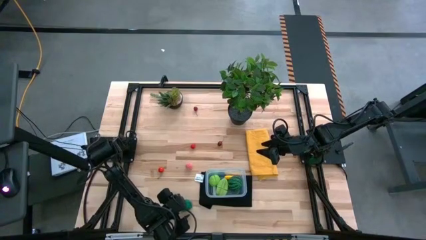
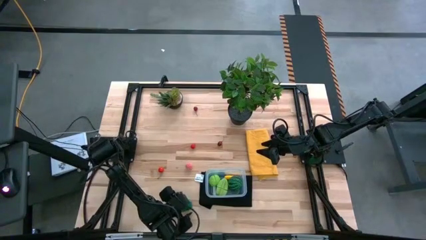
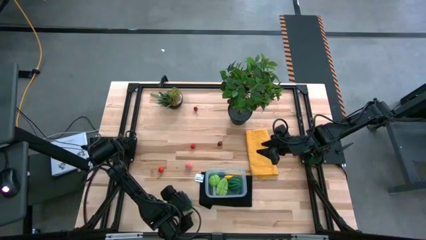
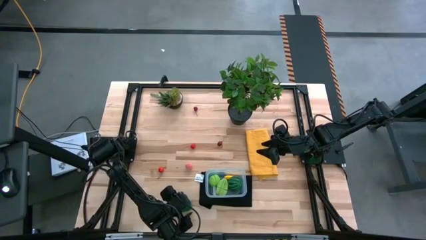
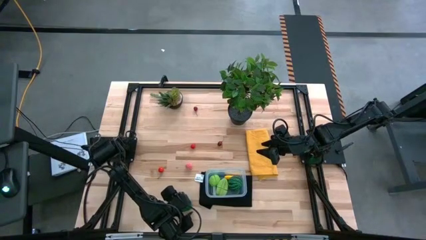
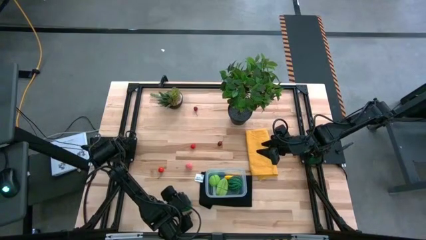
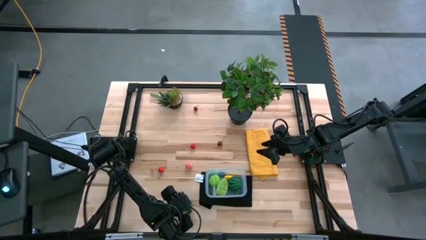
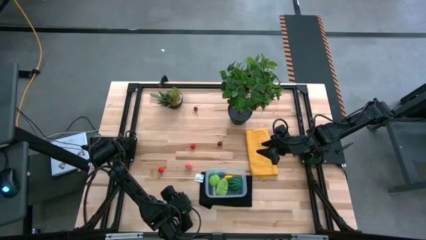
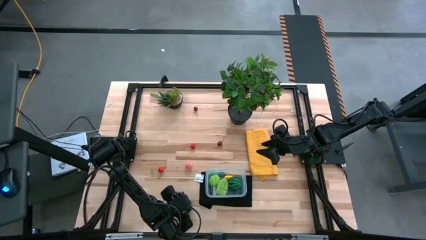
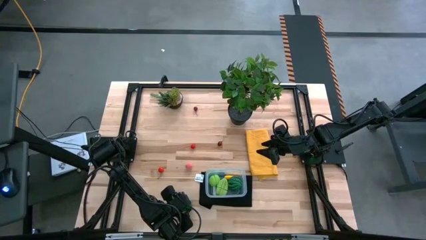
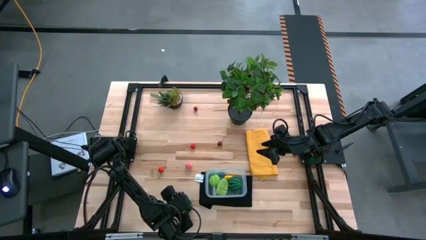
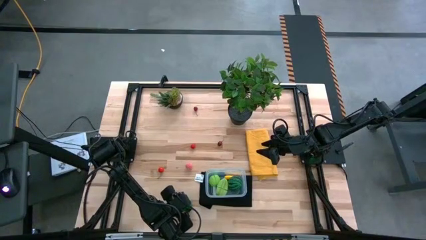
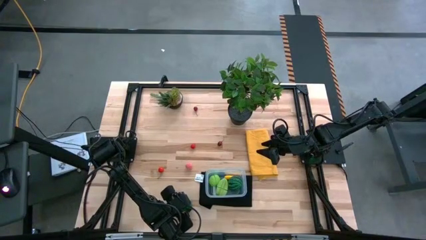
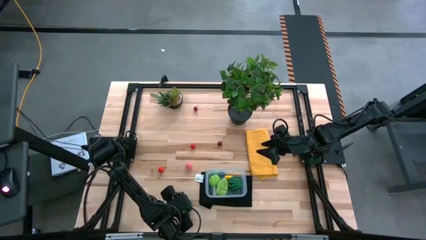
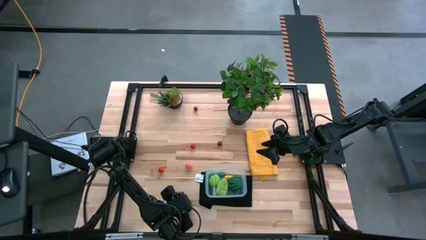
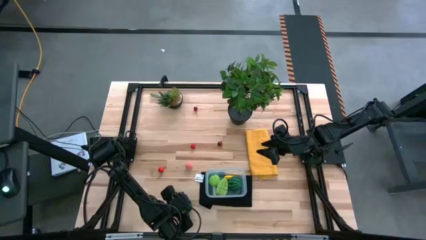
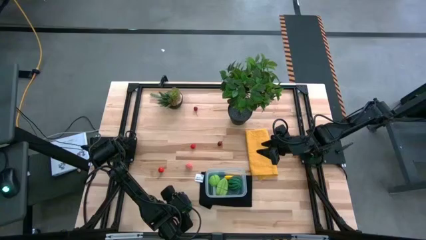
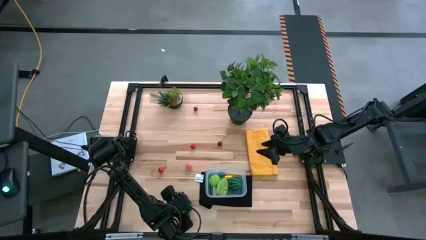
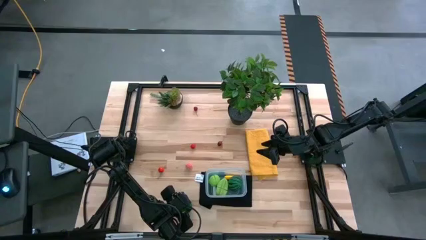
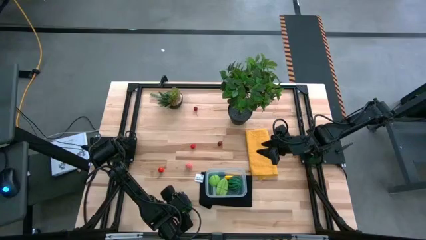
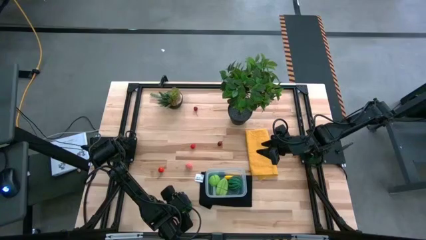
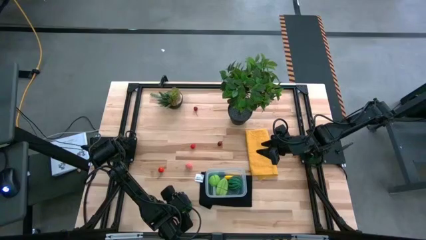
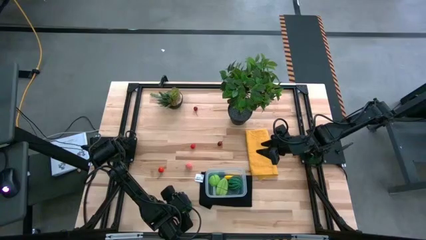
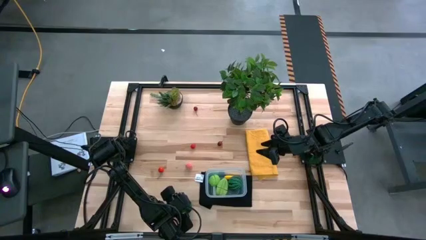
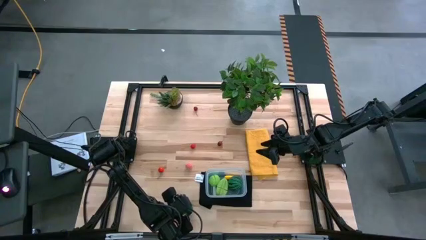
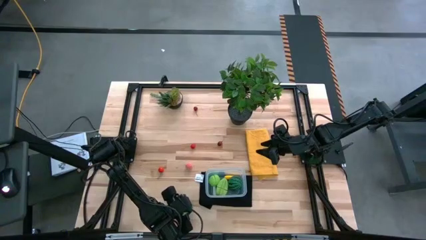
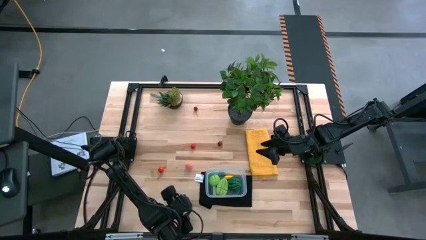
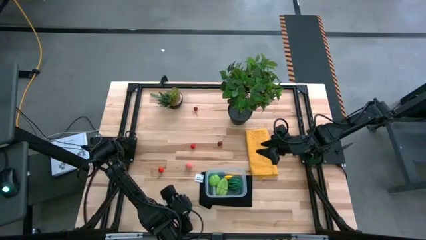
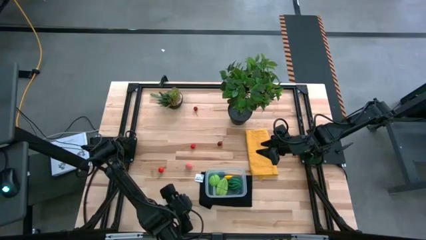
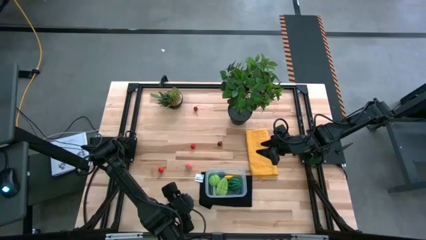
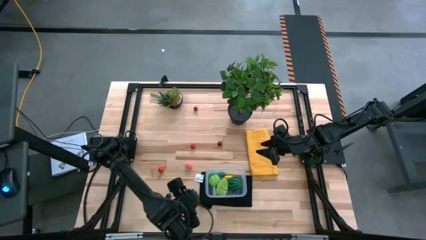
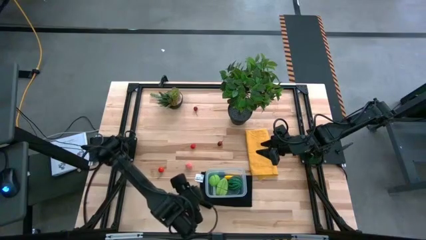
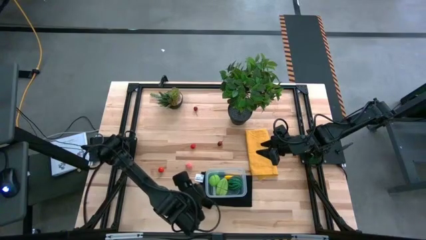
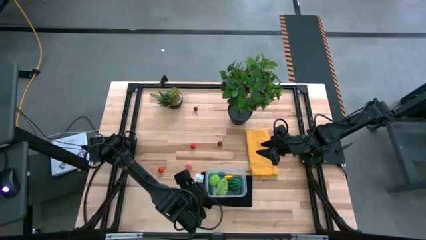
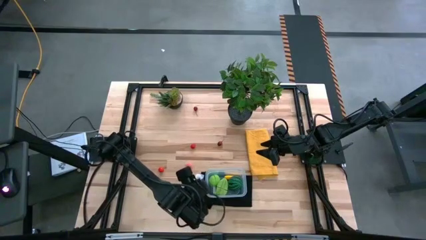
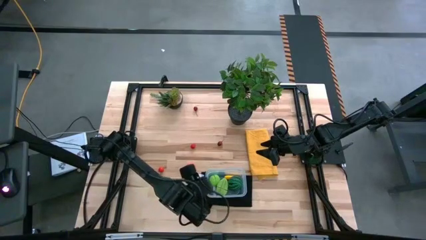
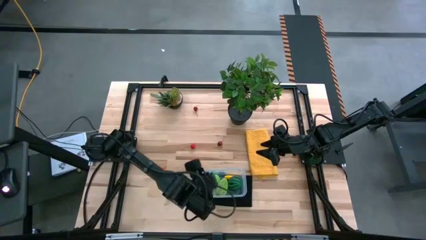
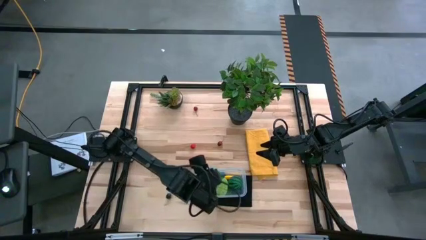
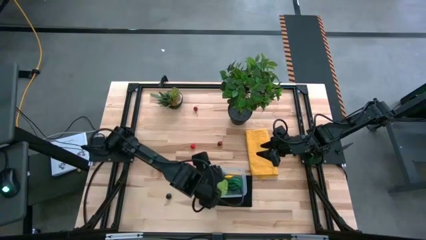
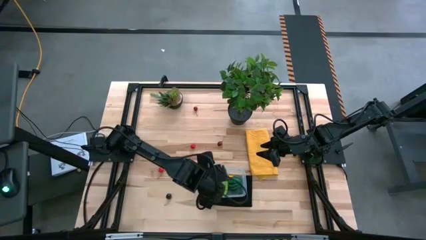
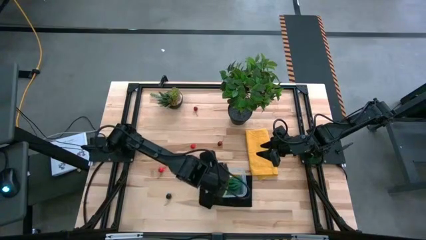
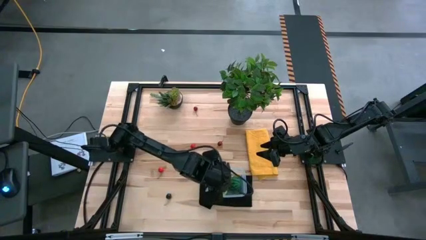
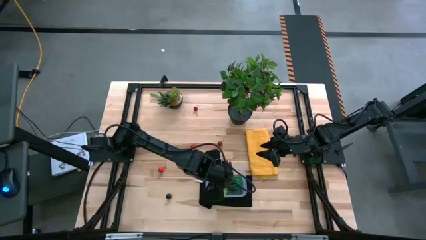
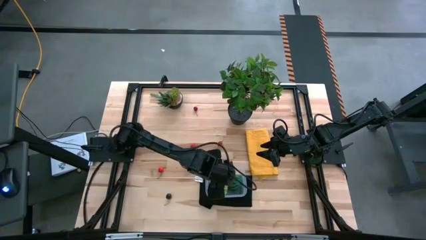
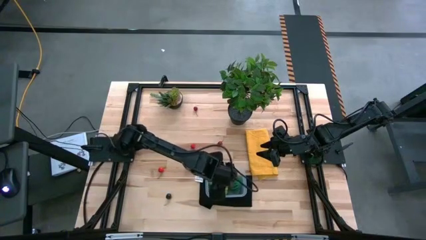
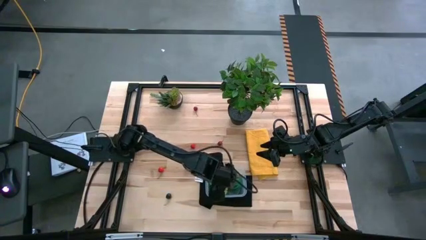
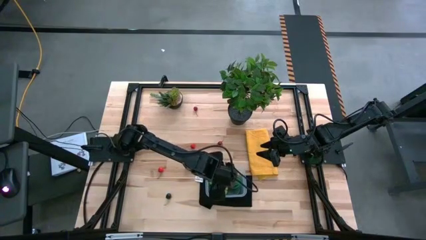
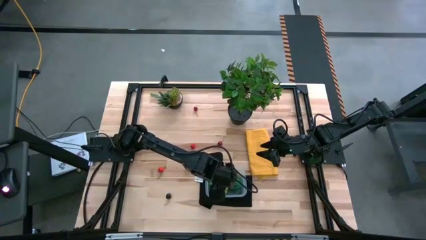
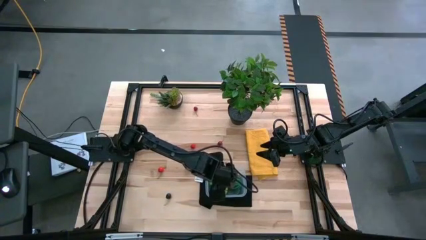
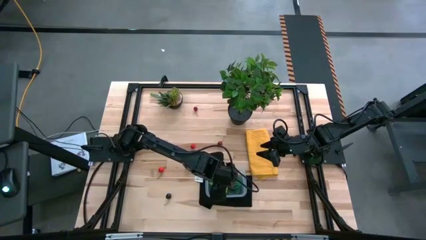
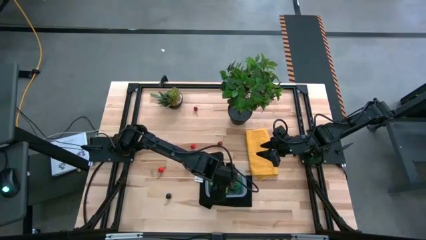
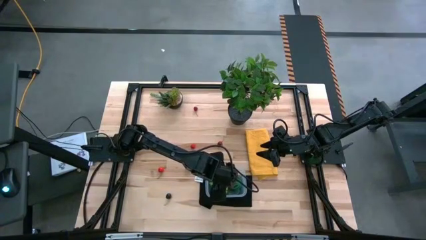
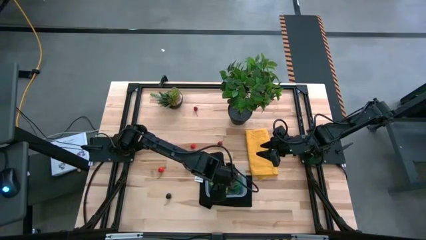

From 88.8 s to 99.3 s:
Task: Pick and placing Produce into tupperware
Put the bell pepper into the transparent bin

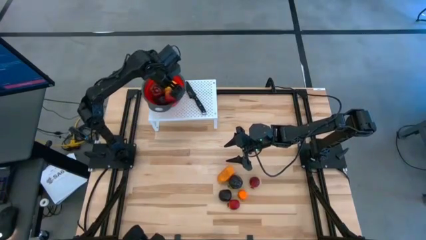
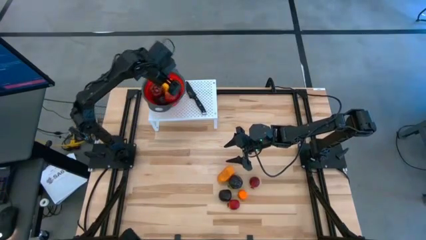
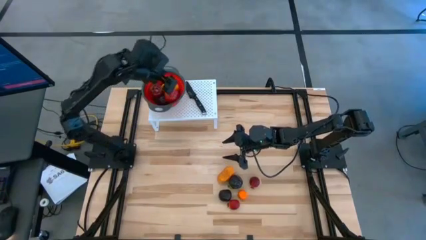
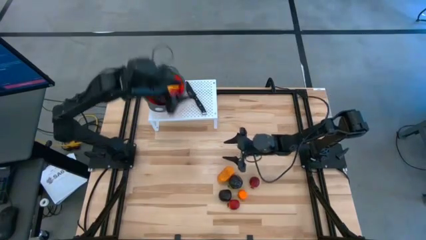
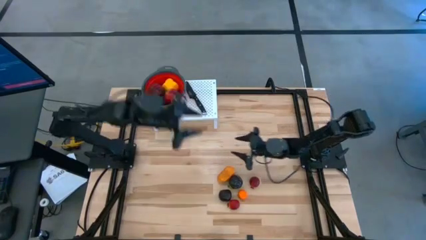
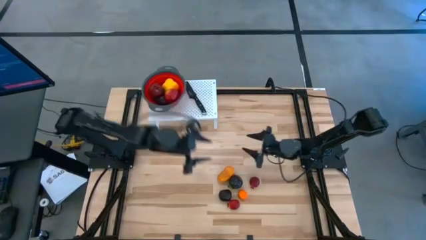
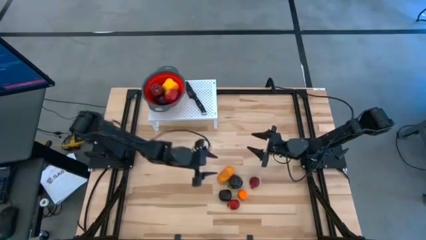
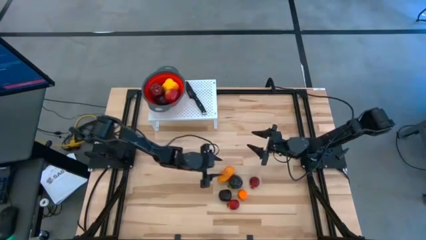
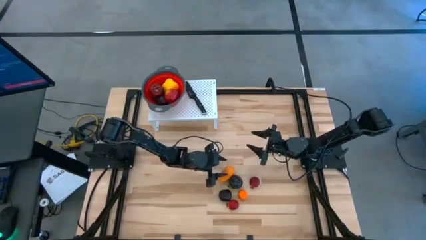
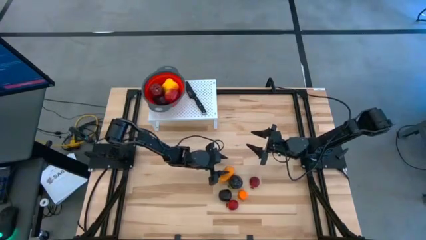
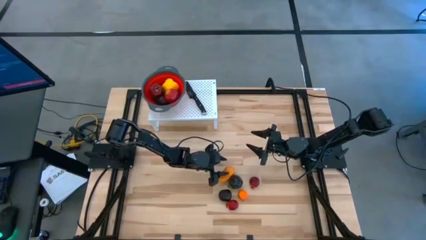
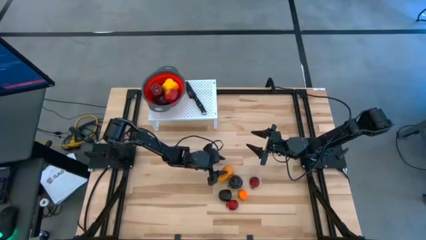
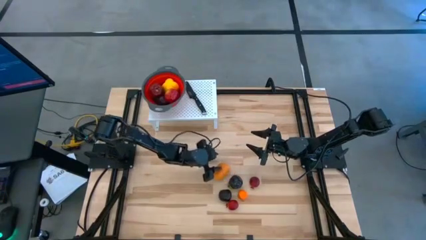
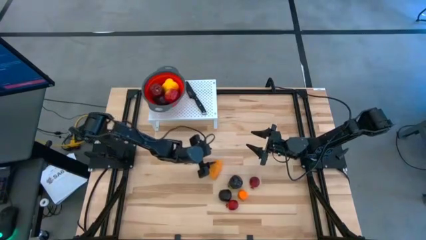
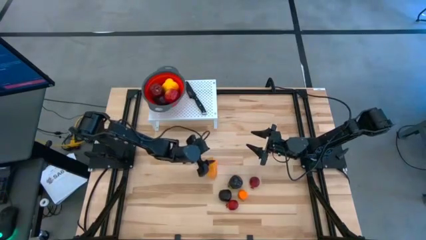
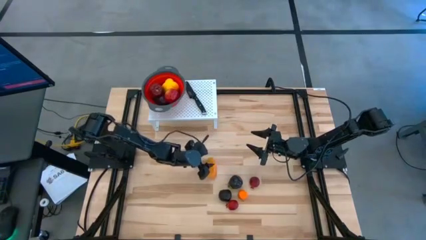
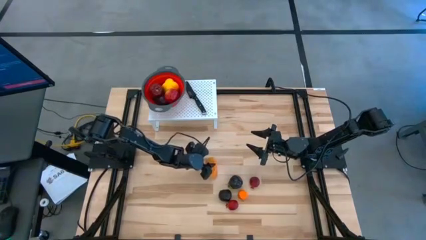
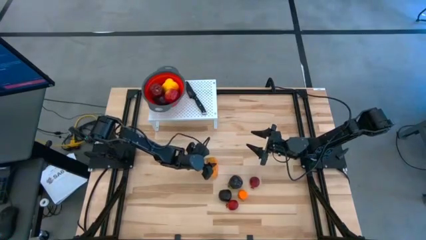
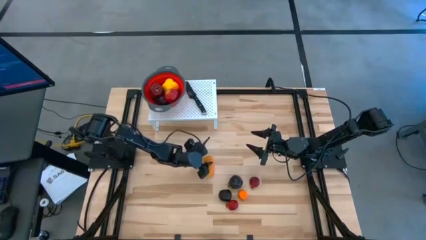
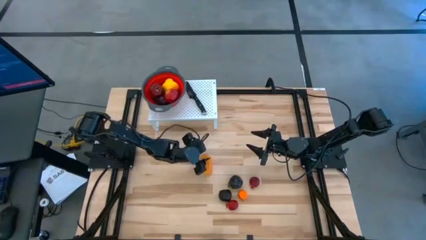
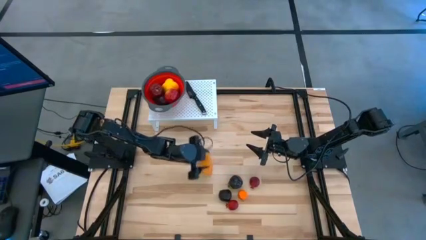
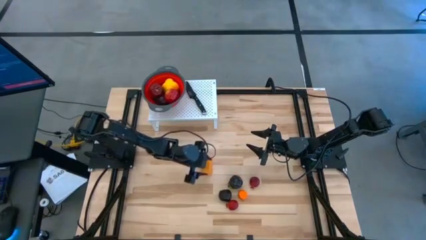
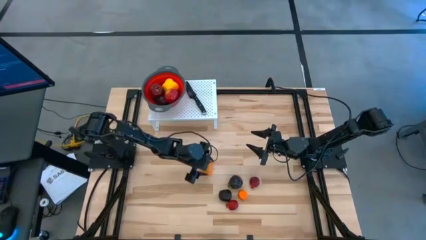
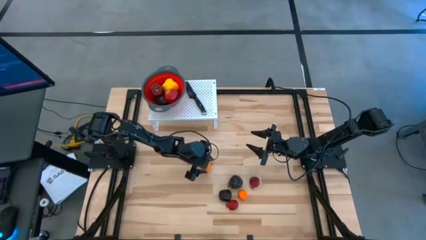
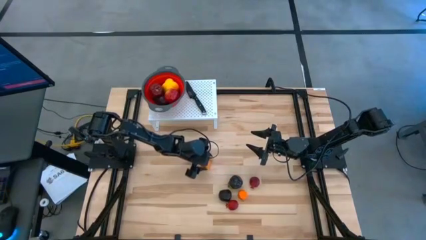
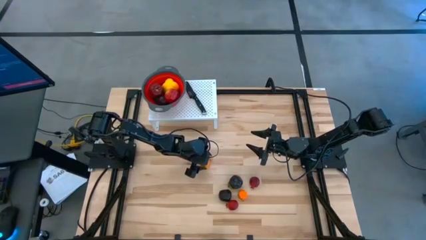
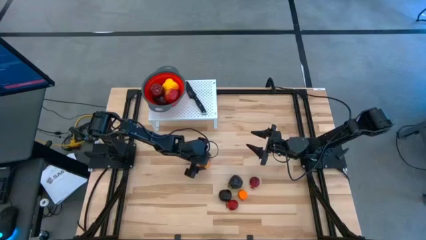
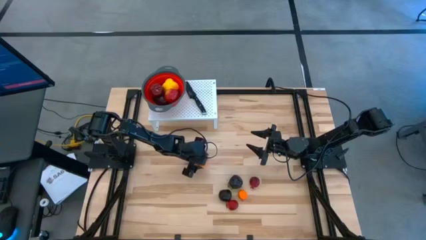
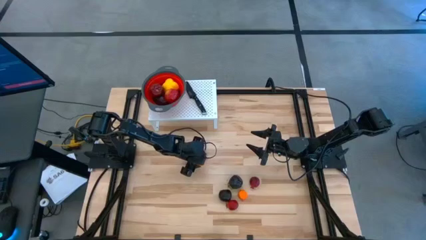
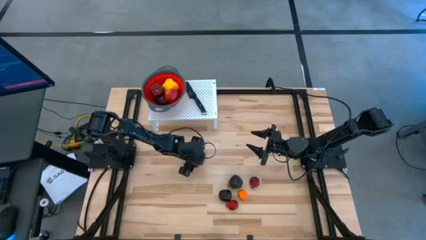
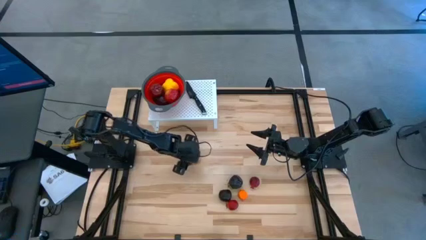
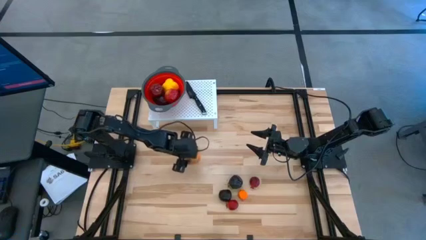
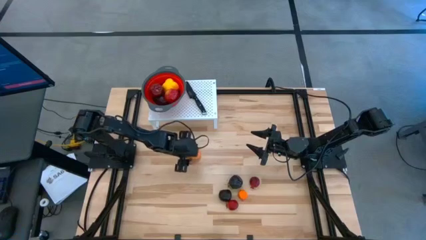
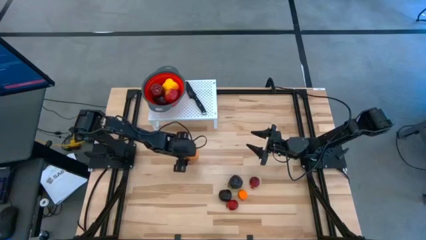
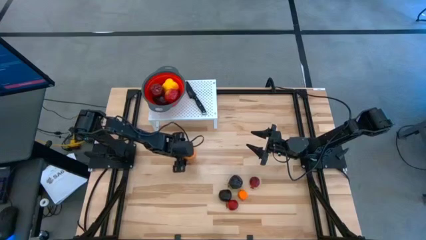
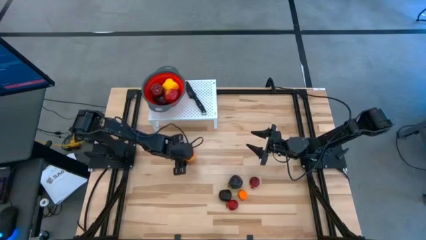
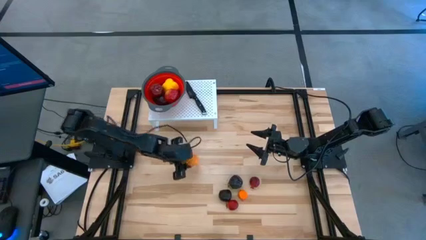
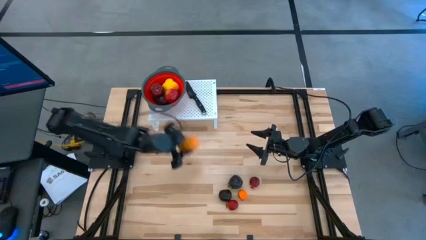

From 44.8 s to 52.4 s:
Task: Pick & Place Fruit
Put the yellow mango into the red strainer bowl on the shelf
